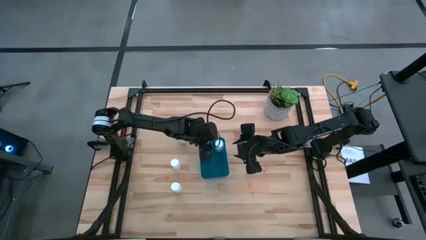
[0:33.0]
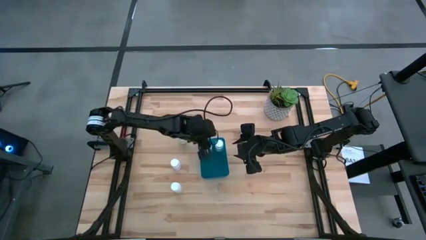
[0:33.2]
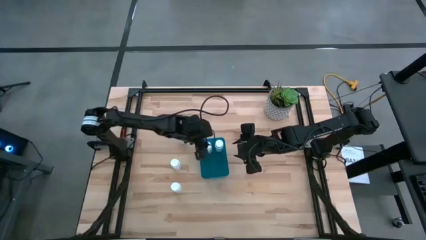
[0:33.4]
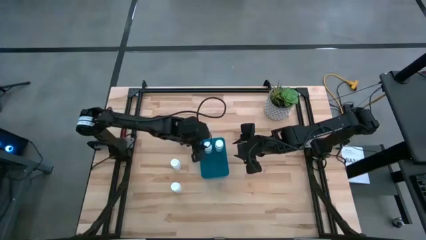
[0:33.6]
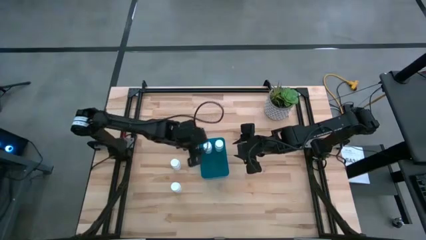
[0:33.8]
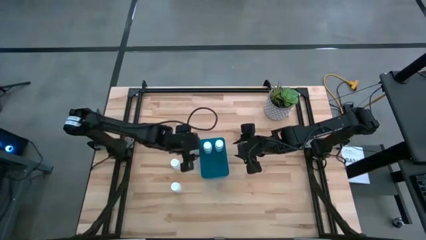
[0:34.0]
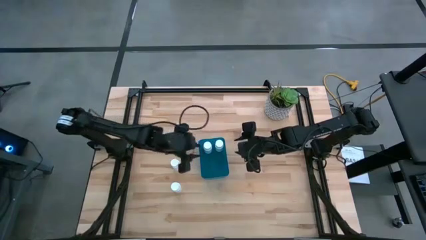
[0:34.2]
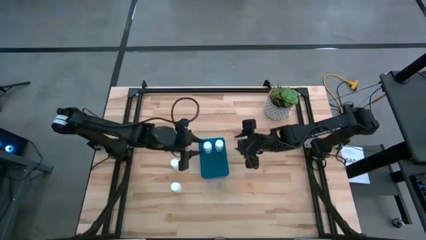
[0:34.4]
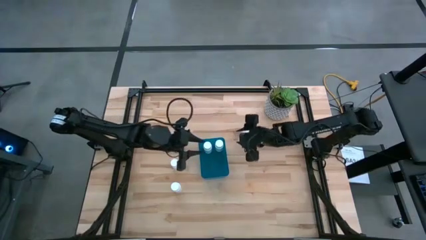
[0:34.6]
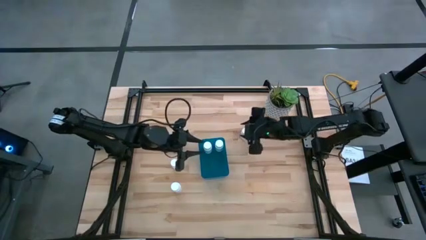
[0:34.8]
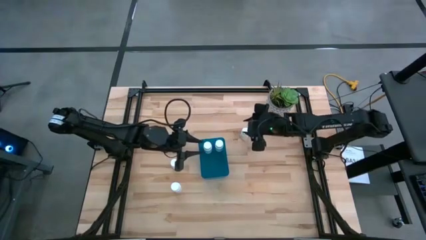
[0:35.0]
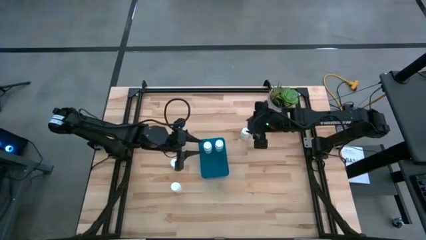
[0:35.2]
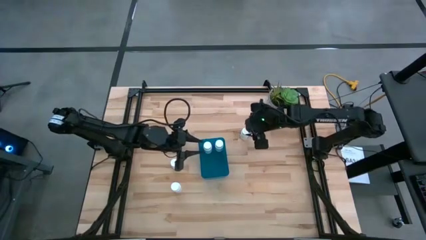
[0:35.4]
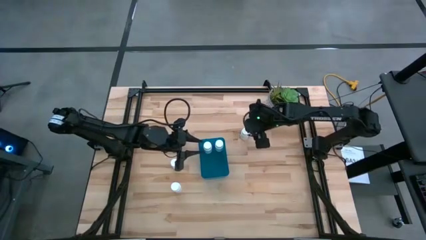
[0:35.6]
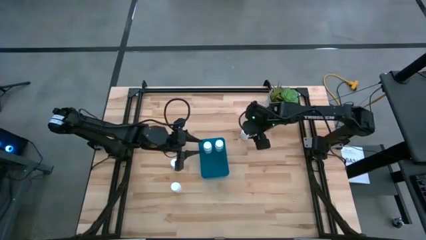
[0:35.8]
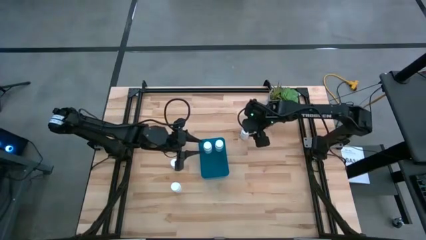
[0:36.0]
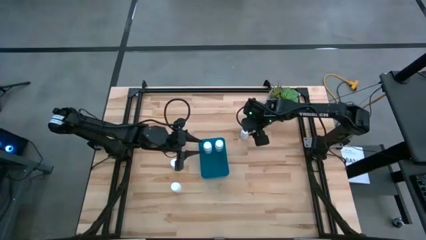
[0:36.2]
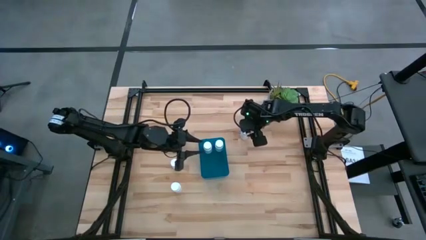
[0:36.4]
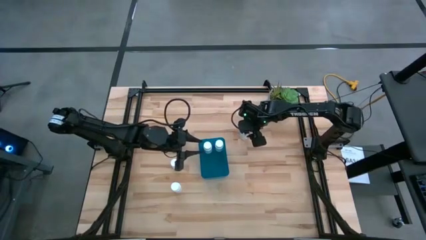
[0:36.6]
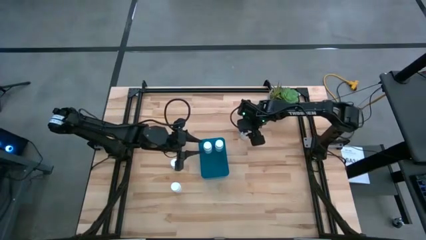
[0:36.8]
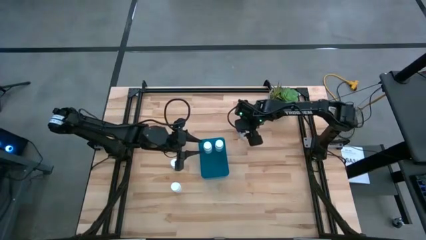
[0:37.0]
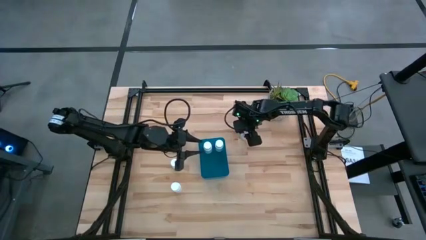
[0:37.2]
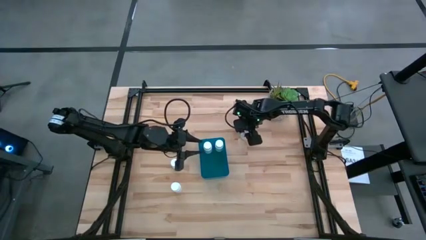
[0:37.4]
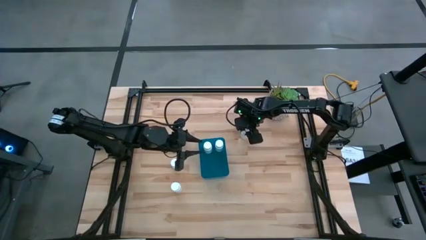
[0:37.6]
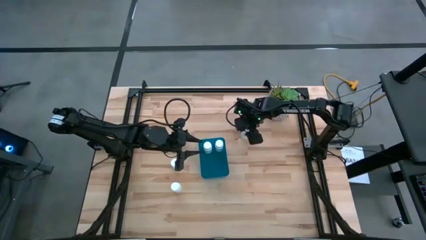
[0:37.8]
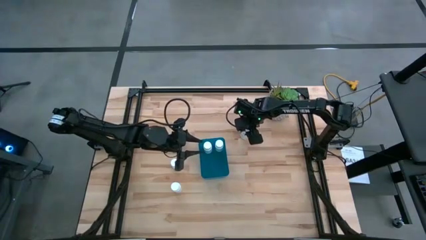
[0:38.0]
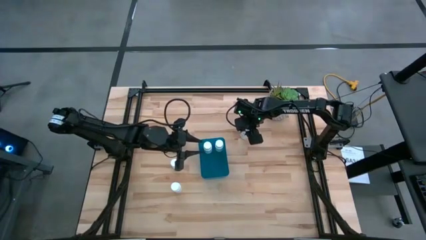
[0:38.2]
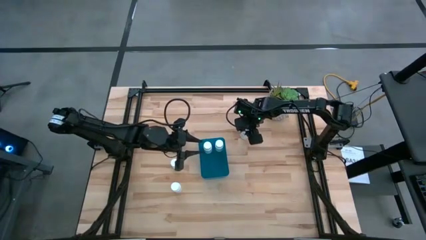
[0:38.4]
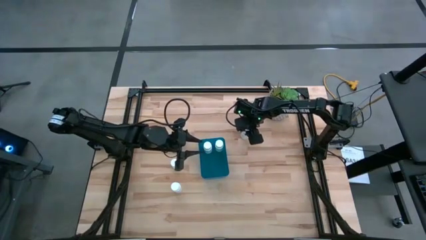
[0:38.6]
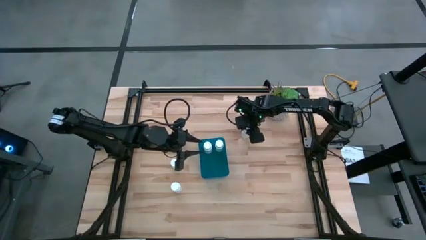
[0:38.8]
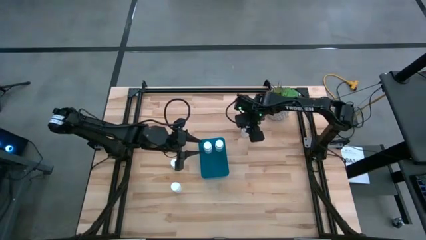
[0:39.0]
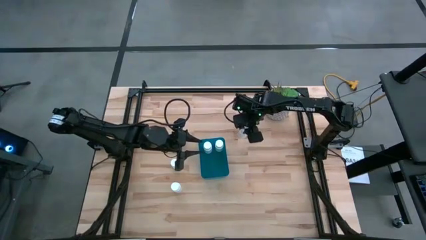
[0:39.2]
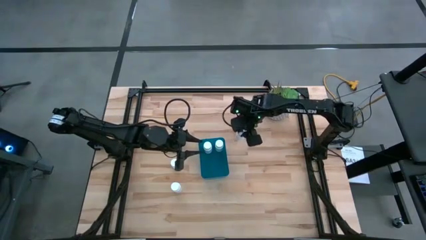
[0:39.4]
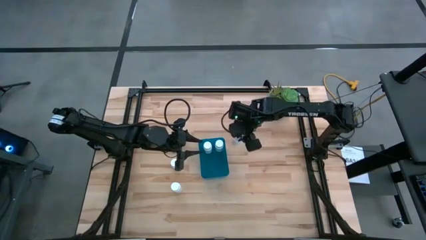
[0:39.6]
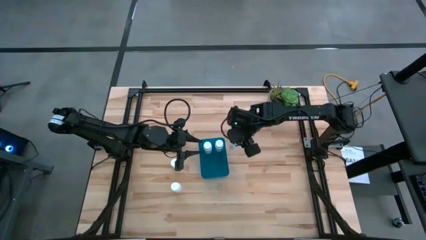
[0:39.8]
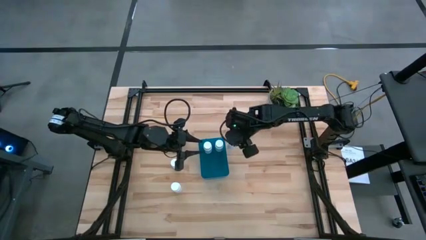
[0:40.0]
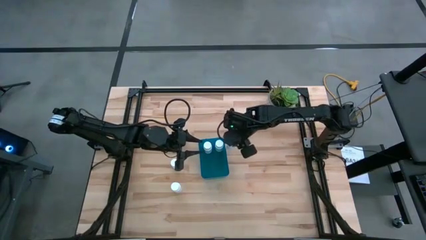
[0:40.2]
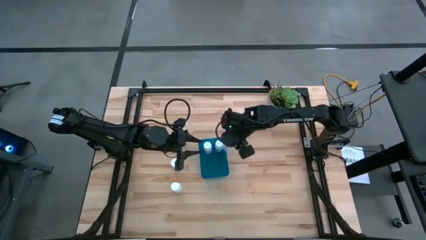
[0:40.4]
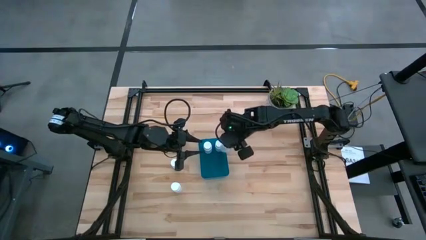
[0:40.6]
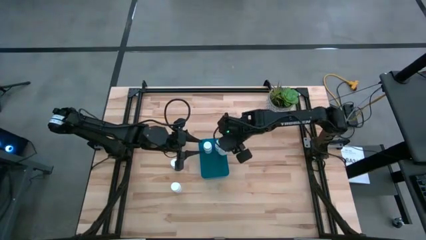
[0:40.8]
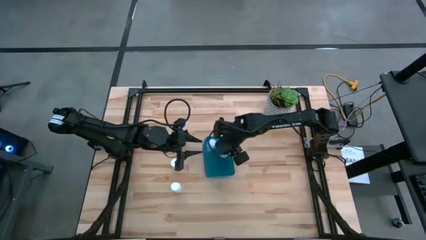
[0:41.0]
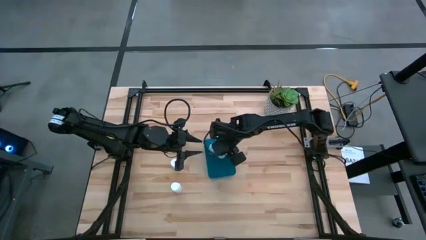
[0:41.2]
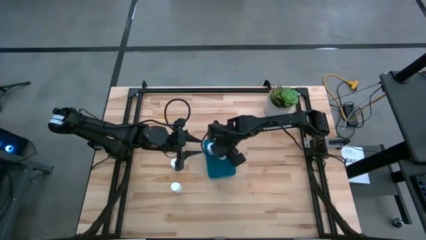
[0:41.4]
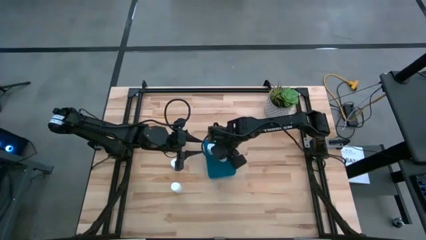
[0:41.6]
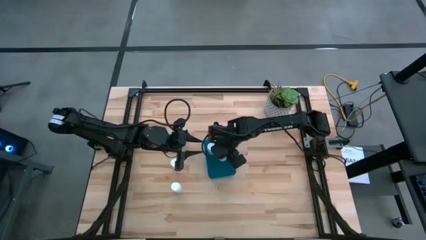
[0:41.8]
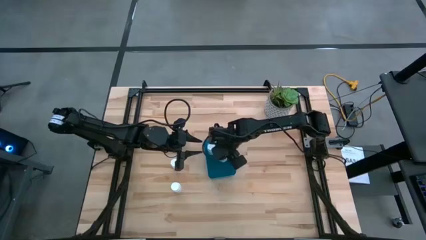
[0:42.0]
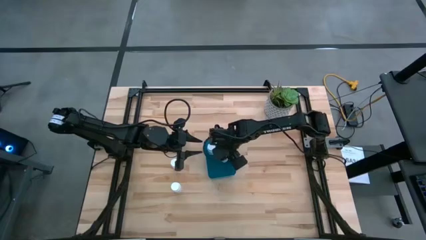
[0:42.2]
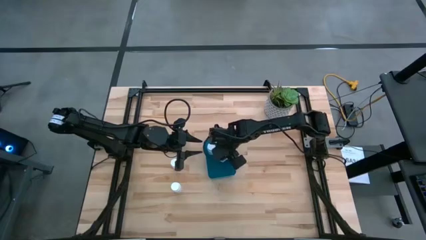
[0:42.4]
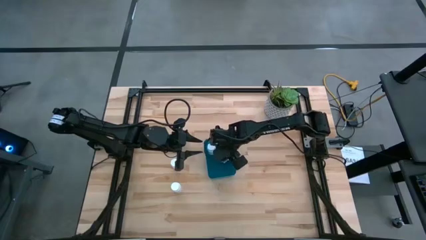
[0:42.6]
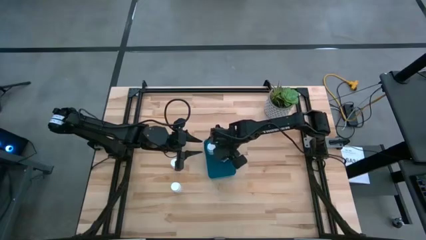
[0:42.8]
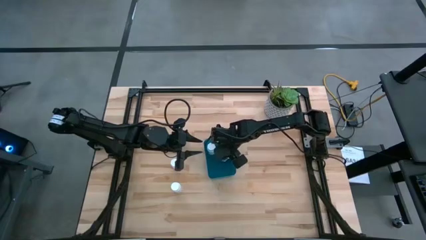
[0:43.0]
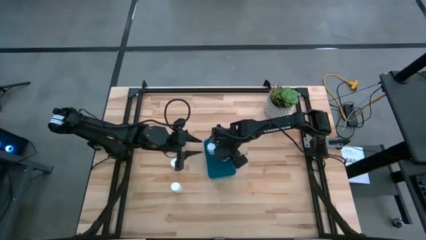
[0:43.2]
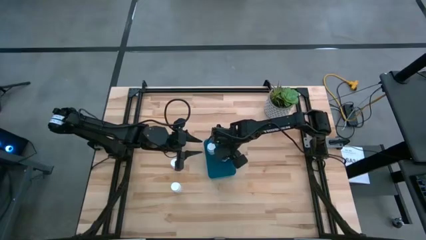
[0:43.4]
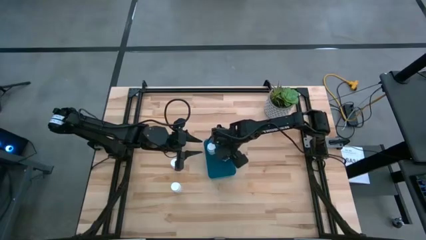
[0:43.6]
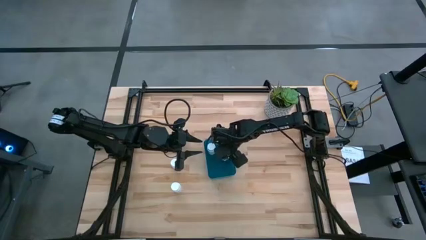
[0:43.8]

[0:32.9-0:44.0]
Task: Pick and place pill bottles into a basket
Put the white pill bottle into the blue bin
